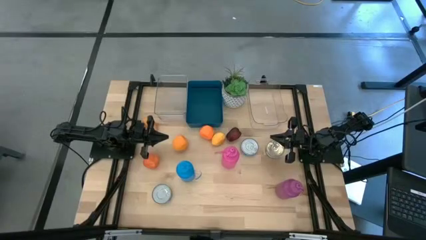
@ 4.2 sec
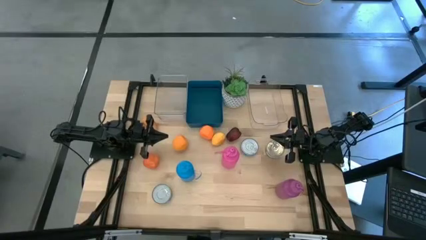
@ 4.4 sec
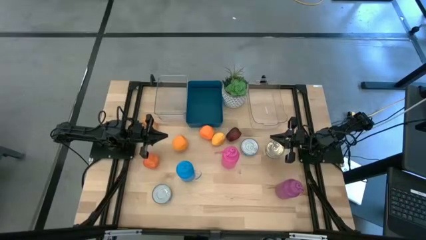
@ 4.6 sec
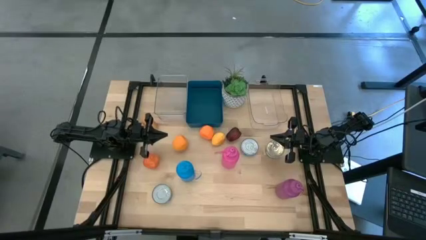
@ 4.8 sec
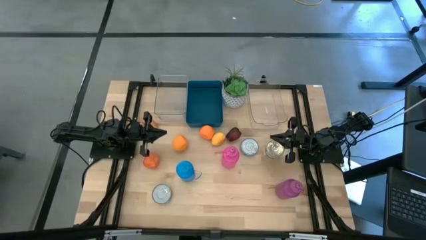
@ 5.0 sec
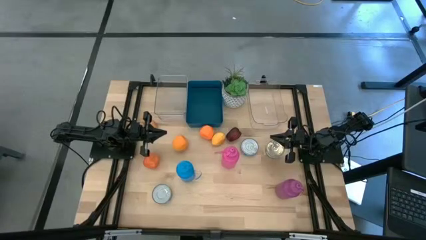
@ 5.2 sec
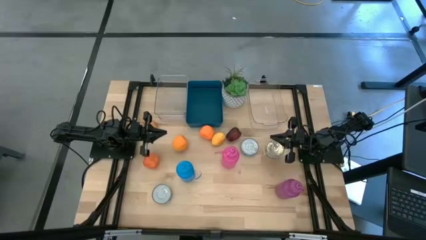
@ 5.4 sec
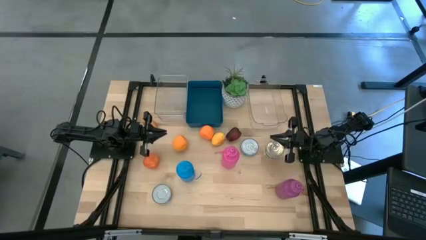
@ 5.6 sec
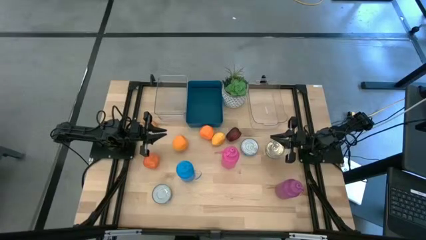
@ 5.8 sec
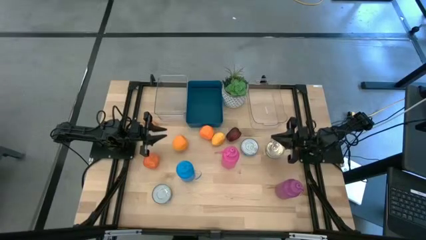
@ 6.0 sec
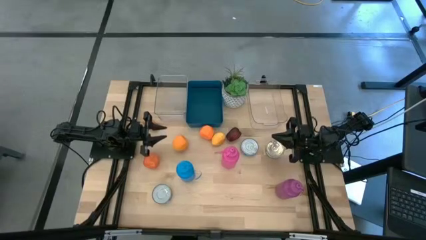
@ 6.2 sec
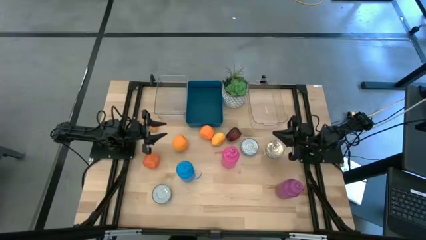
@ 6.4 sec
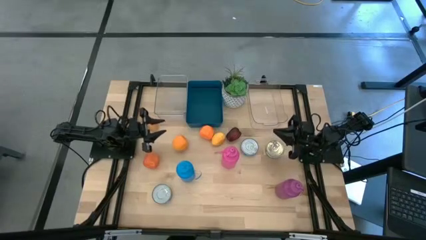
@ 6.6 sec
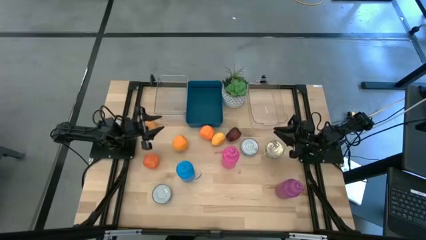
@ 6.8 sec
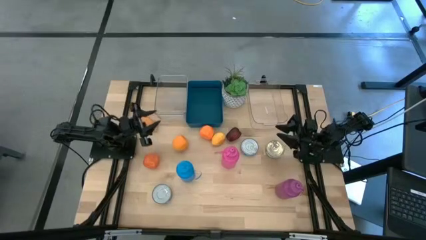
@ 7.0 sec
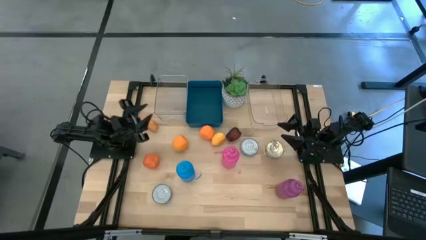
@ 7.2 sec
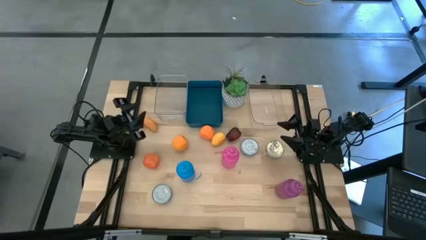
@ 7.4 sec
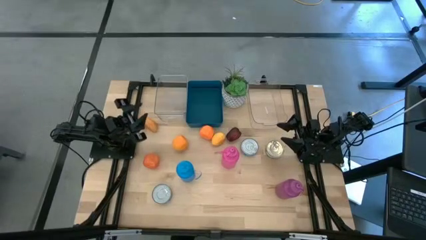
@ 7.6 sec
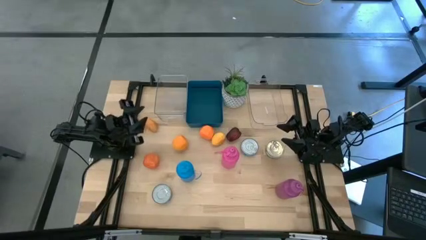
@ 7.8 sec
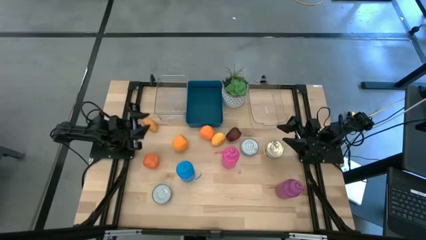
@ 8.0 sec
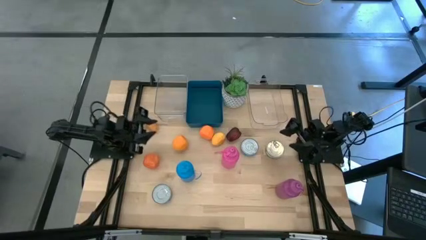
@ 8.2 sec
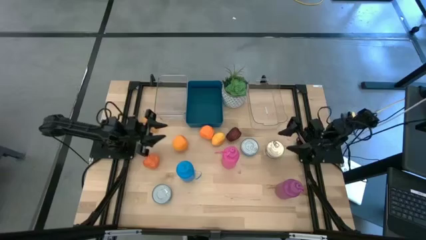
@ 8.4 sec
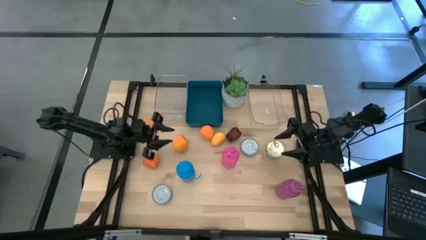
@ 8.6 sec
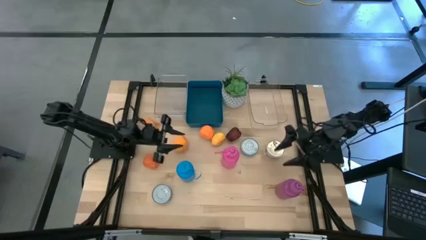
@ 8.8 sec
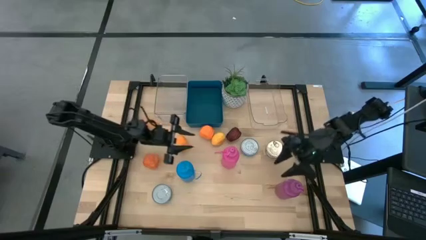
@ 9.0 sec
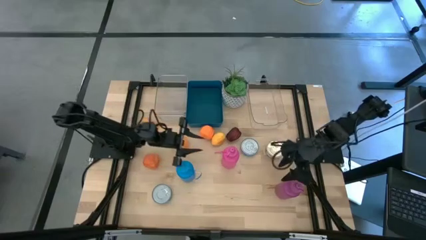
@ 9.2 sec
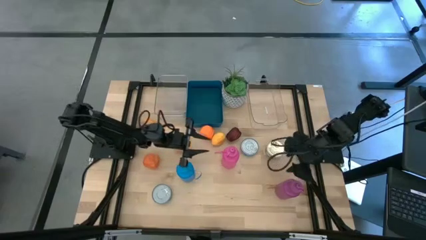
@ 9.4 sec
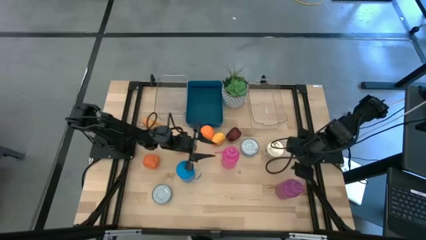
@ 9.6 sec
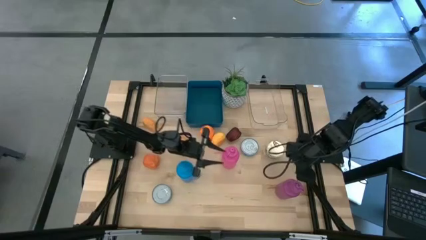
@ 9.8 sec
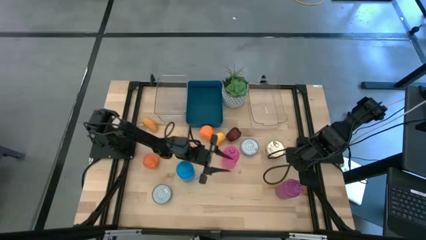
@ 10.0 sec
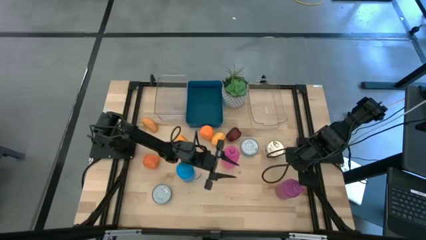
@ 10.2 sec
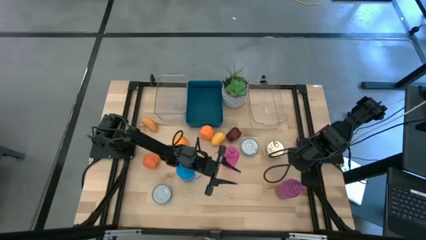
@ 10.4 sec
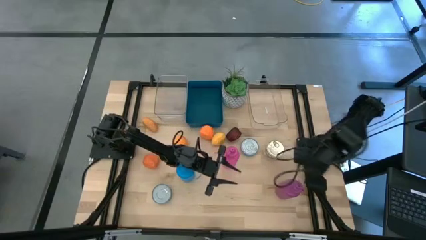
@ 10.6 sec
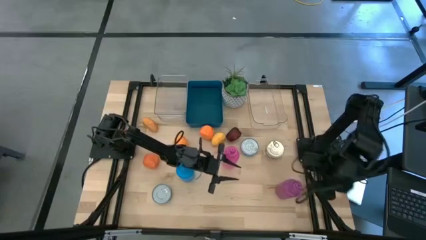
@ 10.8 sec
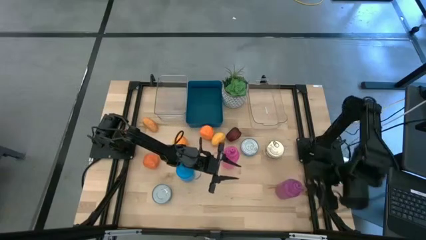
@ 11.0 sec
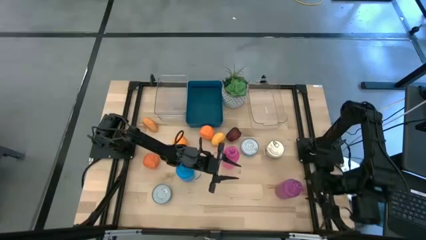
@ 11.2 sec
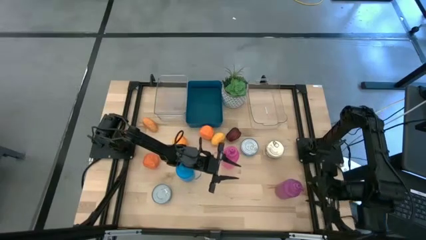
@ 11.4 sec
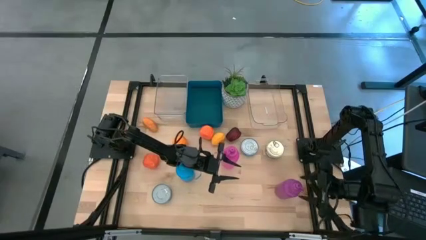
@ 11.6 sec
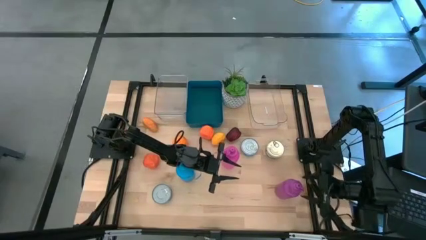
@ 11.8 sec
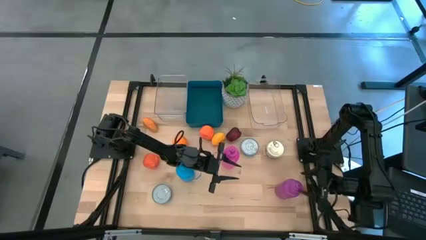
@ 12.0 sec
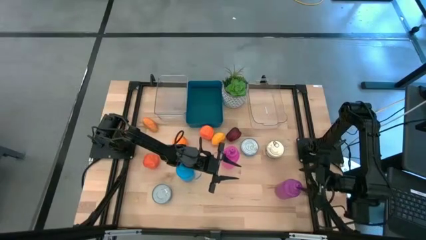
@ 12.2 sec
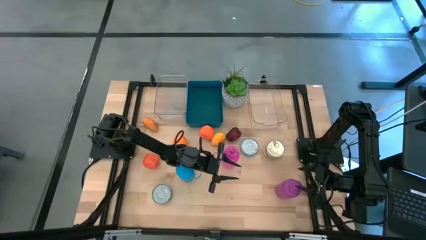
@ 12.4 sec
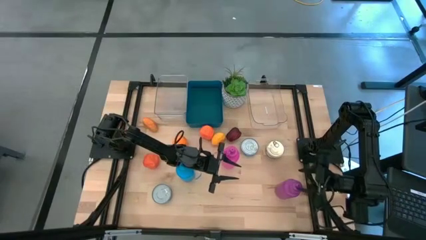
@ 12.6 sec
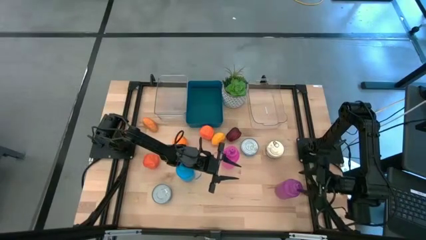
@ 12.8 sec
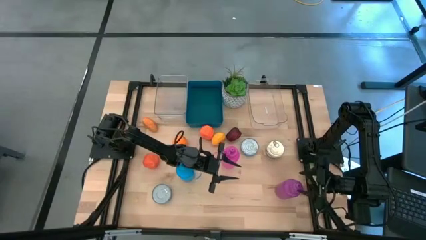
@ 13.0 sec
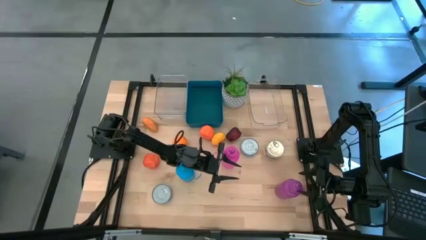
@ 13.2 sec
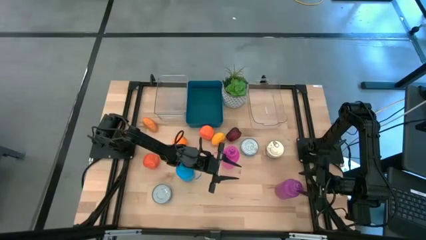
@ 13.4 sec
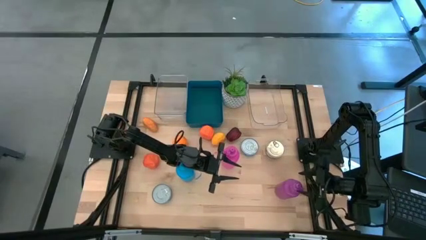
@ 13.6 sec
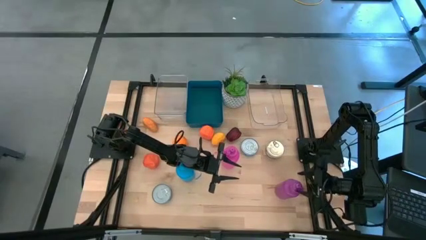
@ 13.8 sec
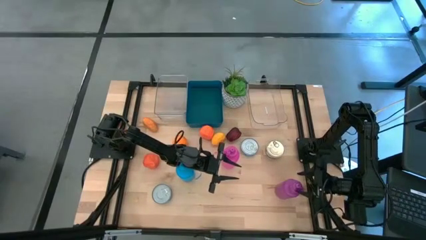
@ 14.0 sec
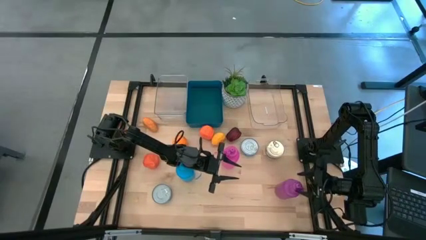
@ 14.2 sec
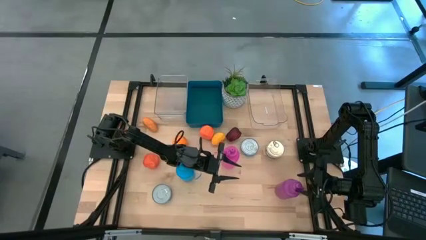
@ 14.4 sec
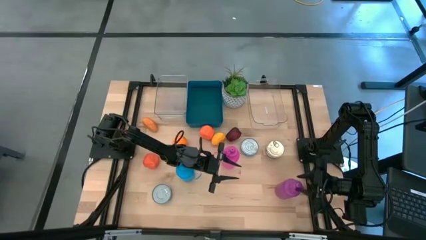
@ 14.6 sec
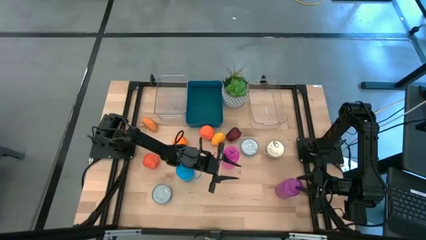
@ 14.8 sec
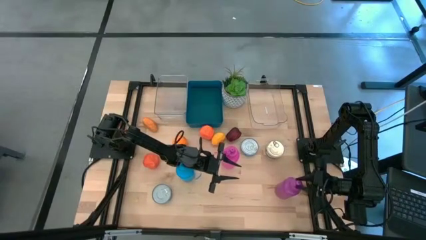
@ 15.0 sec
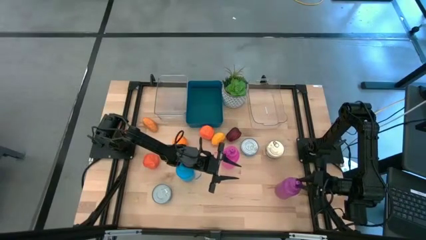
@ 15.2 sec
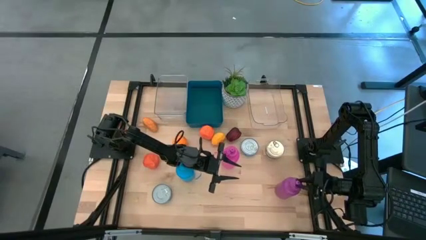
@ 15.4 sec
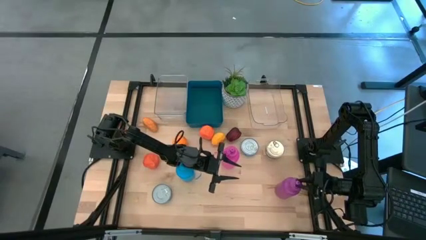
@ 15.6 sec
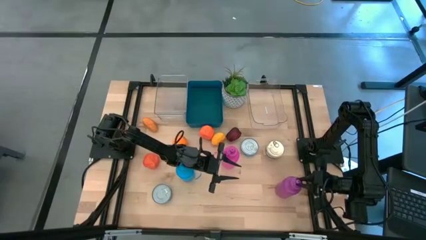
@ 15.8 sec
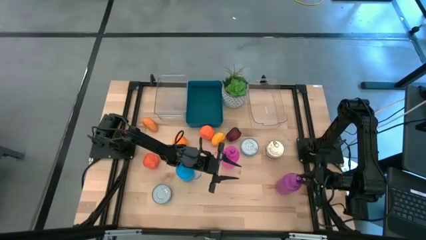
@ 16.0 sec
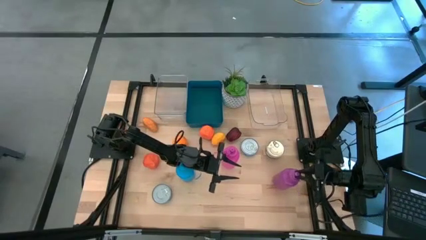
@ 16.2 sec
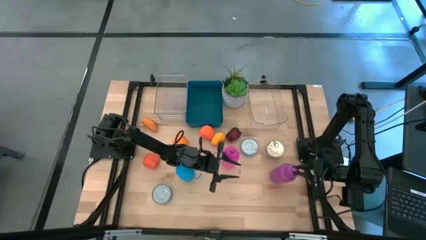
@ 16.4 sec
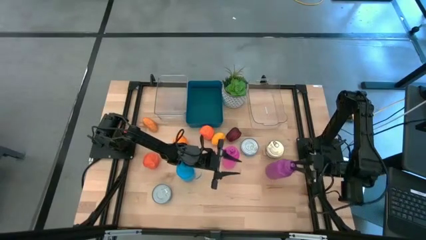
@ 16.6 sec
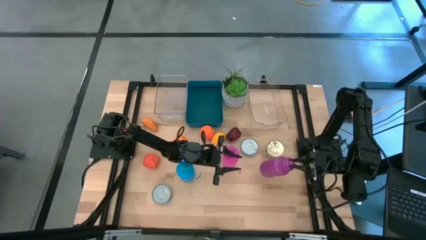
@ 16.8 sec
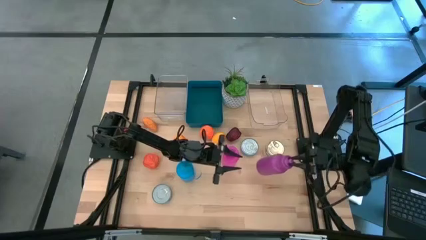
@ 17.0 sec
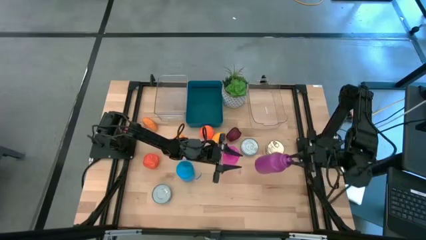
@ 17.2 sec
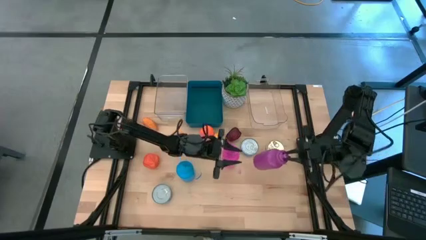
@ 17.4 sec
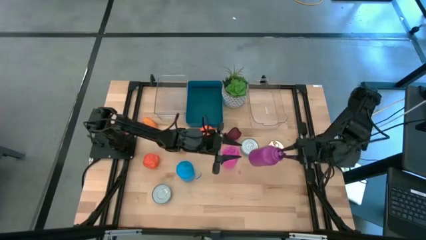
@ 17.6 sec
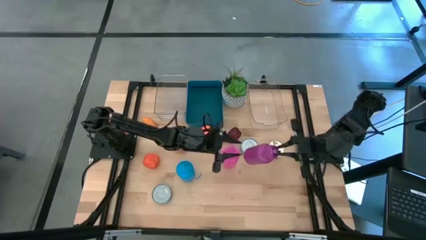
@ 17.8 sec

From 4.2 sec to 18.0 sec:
Task: Pick & Place Food Item
Put the purple water bottle into the left transparent bin
